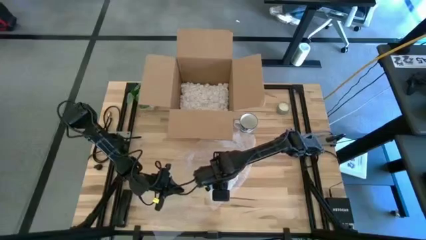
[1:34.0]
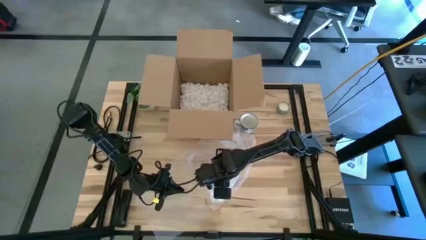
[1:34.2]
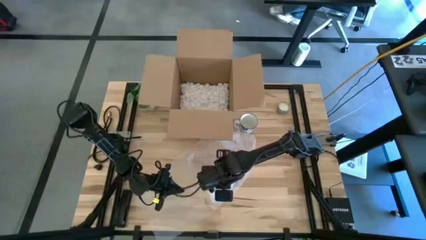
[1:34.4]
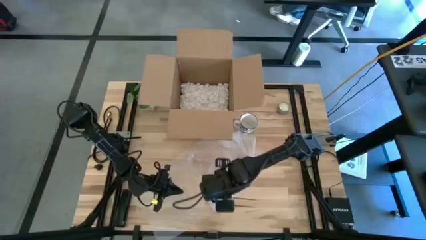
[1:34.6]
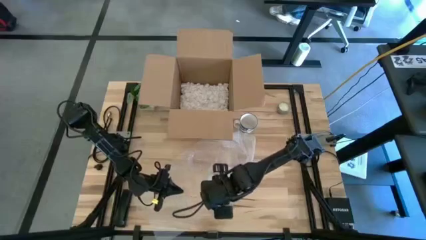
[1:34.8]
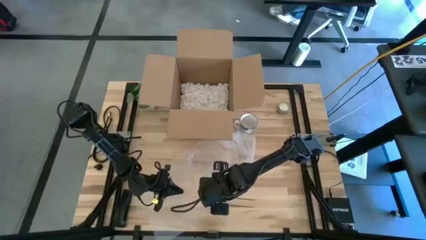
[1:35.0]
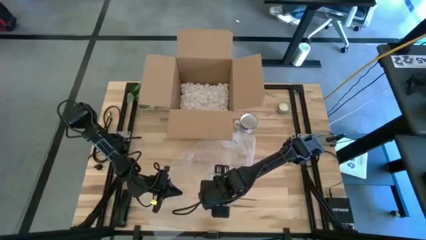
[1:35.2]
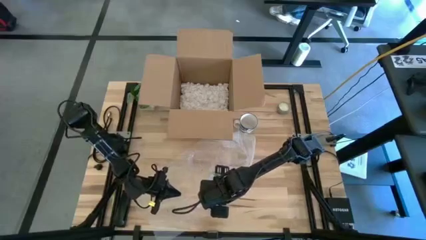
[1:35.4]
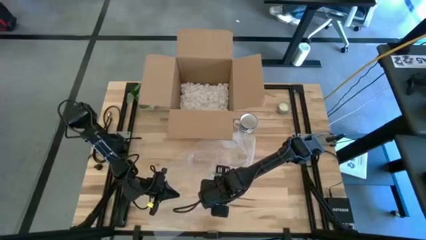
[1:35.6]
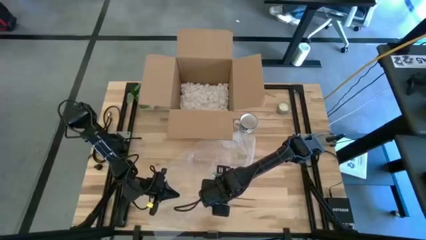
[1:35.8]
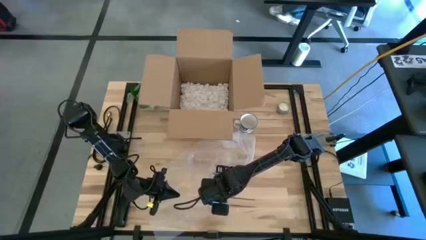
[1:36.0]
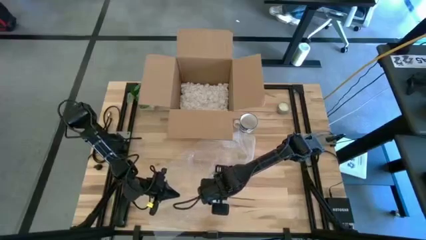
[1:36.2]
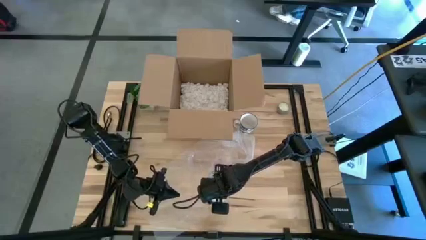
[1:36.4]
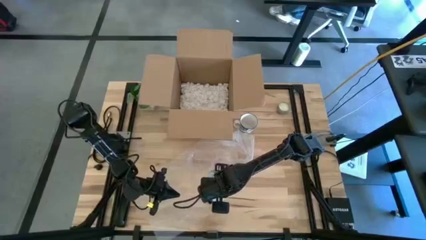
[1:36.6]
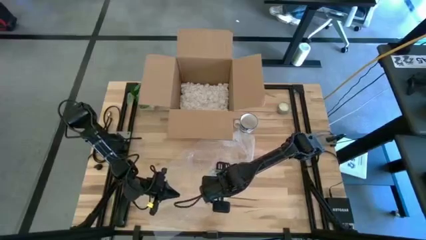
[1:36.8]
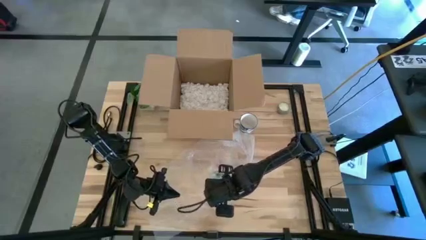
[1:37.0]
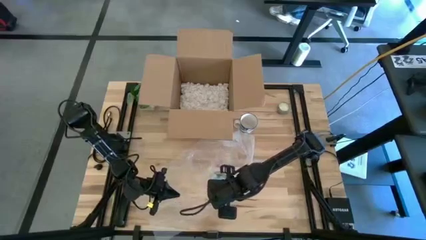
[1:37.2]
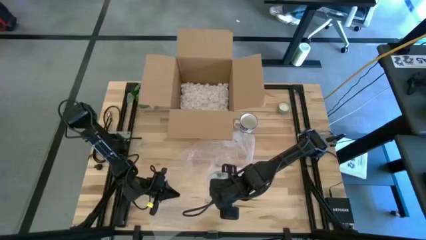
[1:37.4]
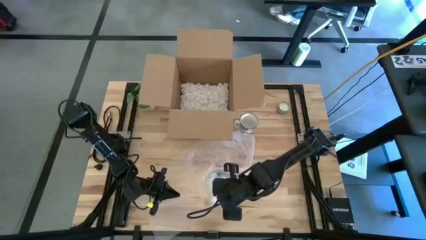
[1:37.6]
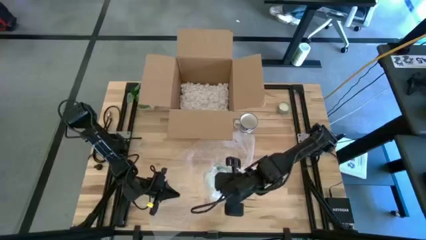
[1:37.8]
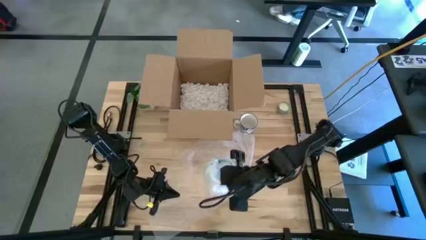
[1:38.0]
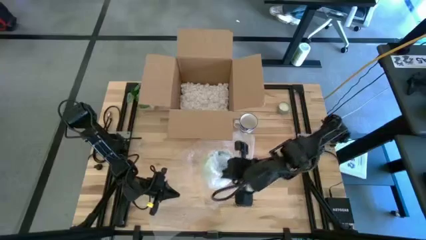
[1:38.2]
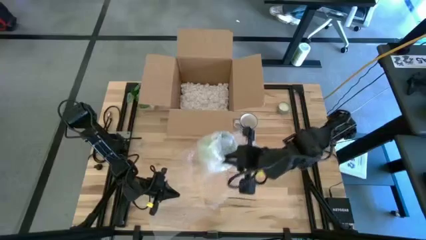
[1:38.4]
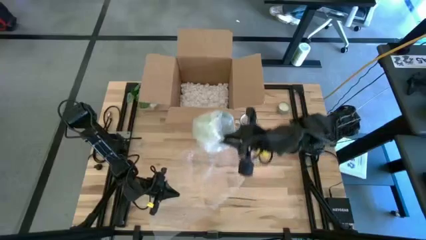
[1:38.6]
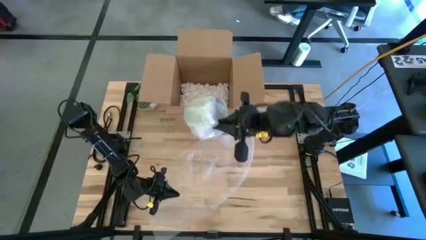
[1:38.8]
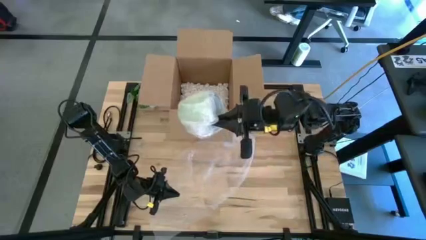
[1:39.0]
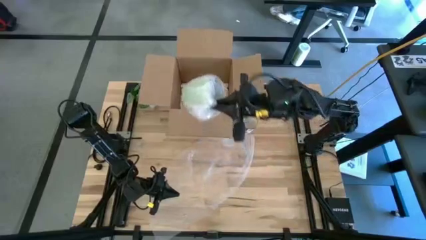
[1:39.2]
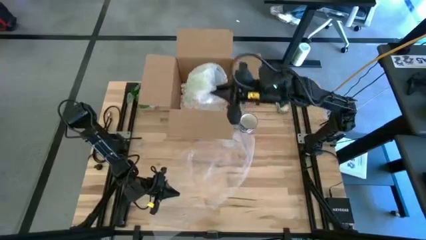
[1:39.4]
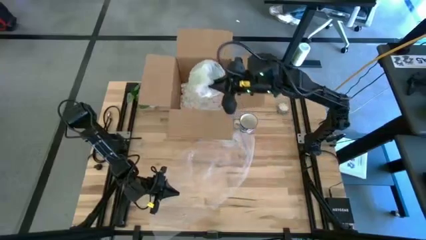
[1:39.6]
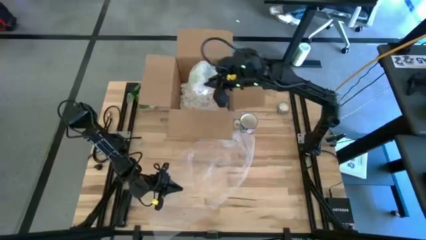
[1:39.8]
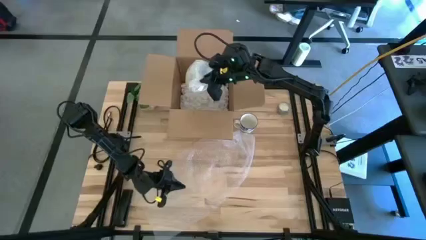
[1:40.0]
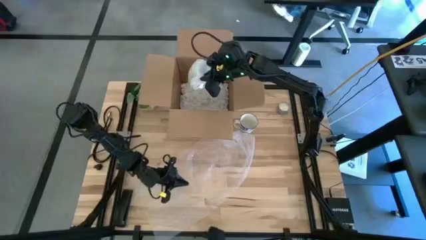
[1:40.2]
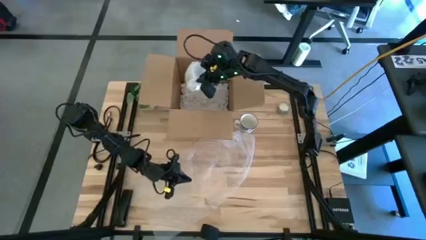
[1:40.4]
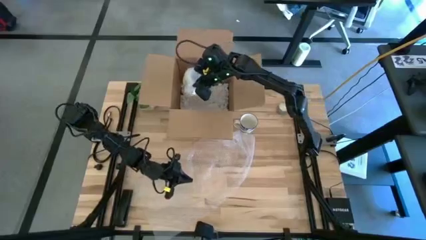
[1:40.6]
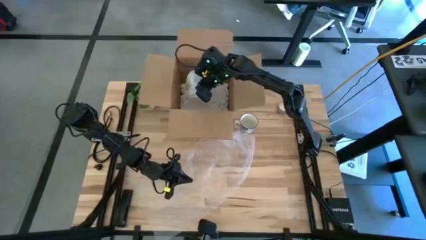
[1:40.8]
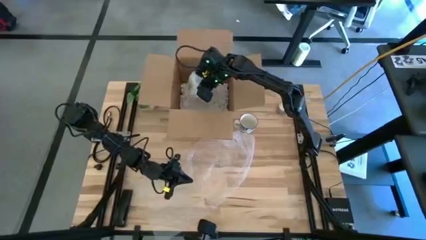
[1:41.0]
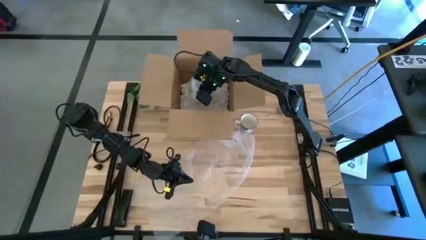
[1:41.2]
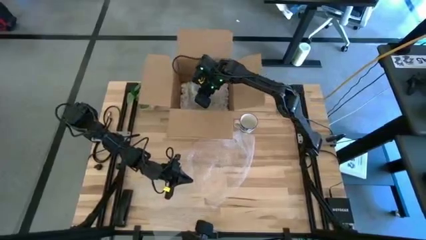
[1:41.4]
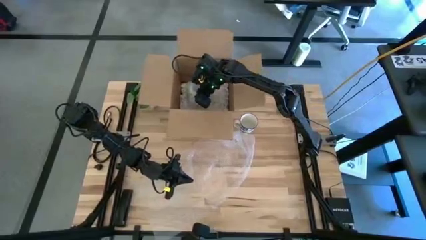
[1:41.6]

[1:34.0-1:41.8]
Task: wrap mug
Put the wrapped green mug into the cardboard box

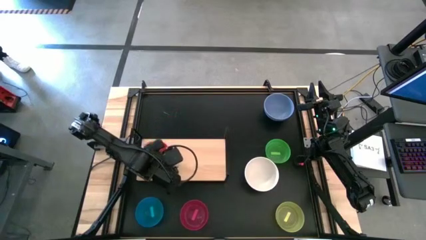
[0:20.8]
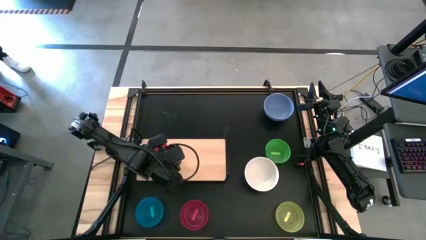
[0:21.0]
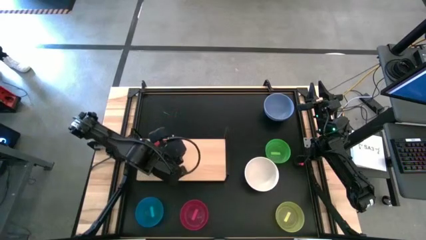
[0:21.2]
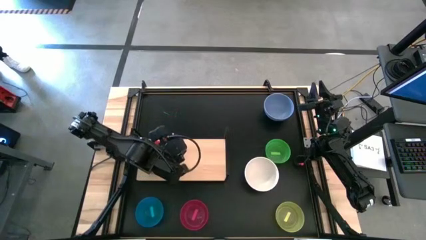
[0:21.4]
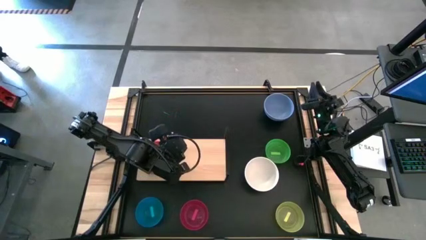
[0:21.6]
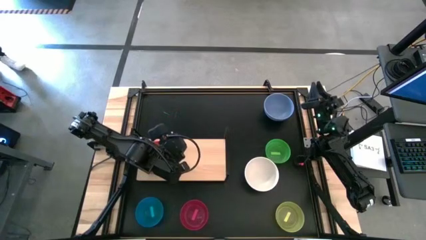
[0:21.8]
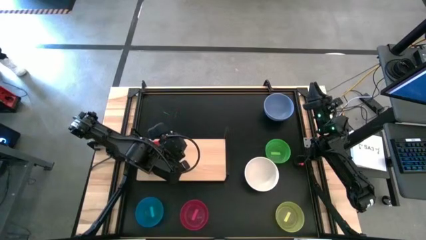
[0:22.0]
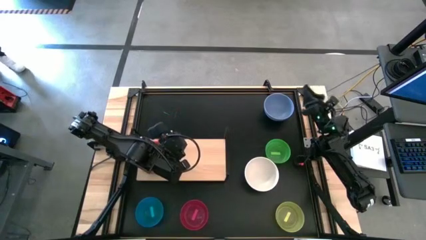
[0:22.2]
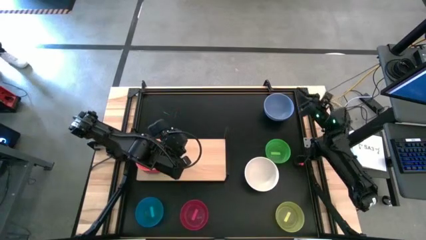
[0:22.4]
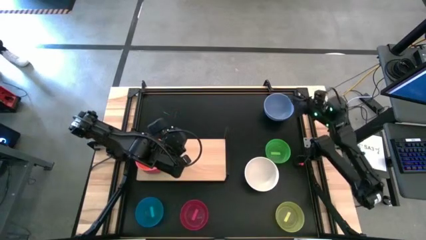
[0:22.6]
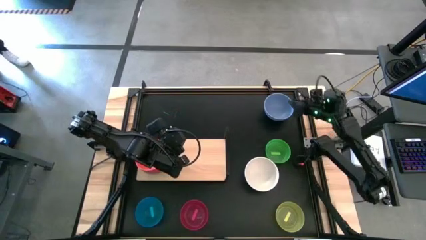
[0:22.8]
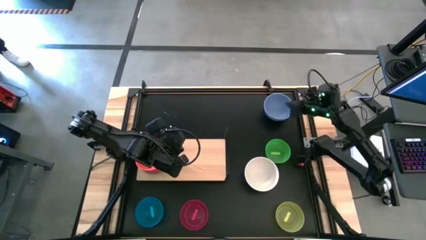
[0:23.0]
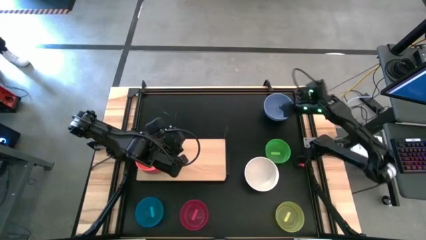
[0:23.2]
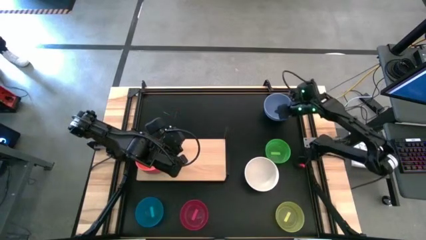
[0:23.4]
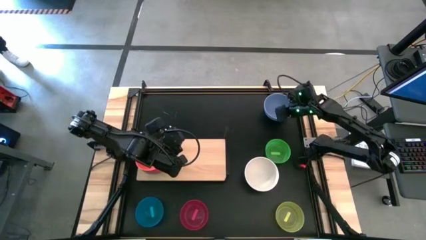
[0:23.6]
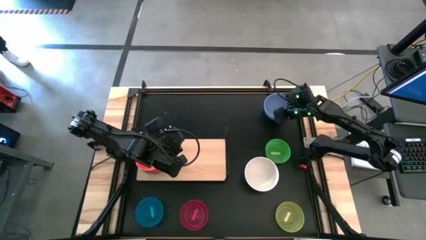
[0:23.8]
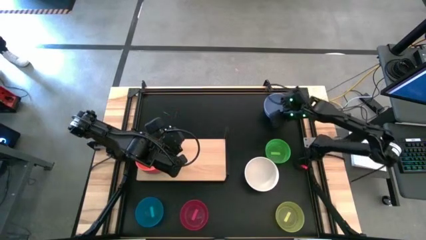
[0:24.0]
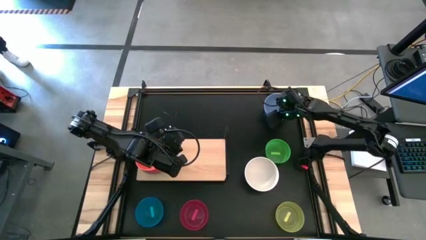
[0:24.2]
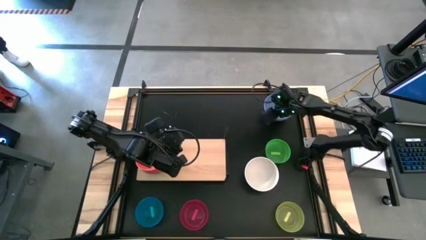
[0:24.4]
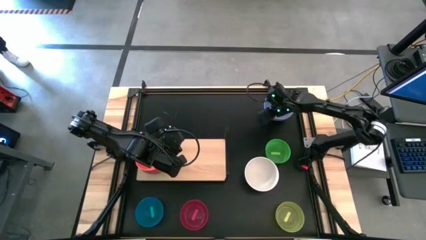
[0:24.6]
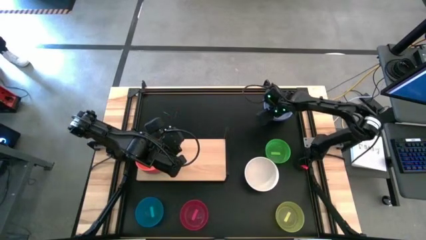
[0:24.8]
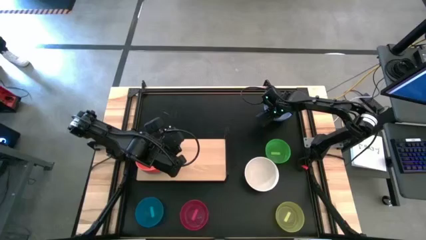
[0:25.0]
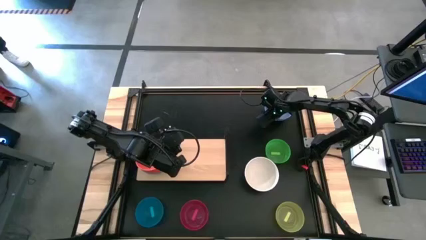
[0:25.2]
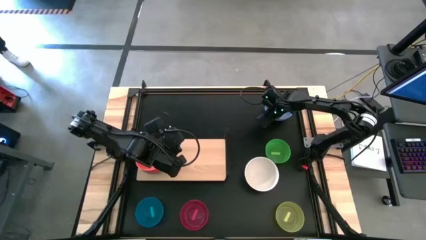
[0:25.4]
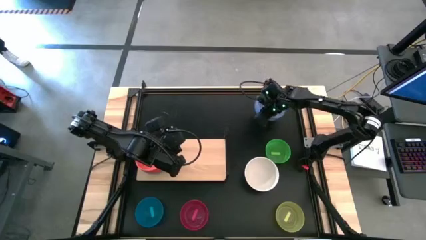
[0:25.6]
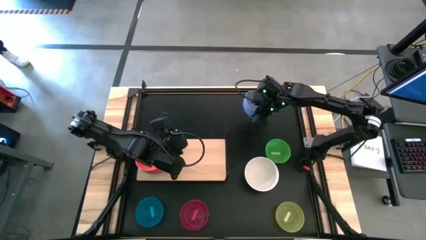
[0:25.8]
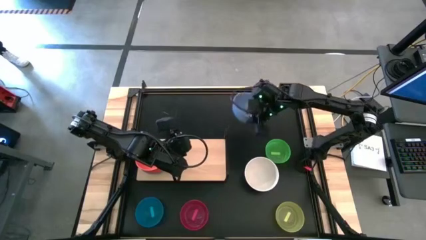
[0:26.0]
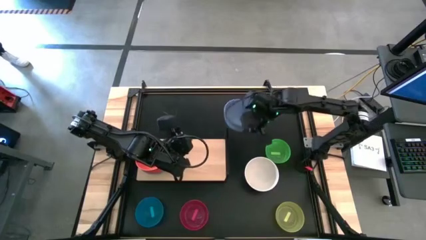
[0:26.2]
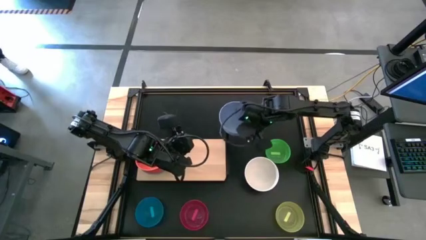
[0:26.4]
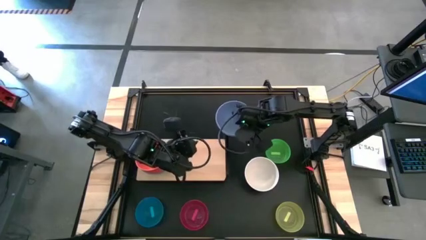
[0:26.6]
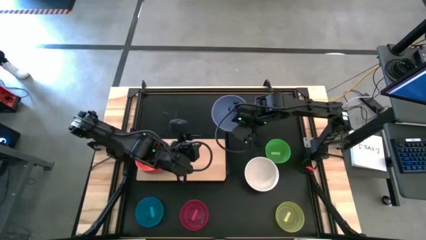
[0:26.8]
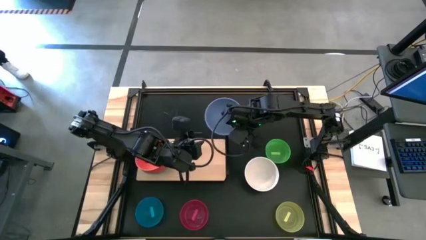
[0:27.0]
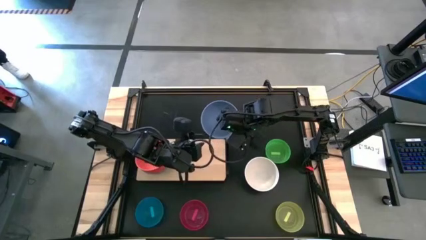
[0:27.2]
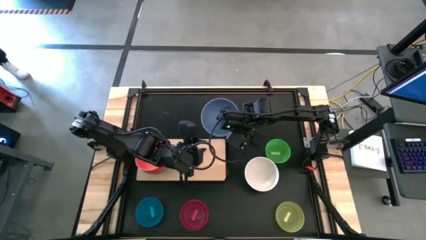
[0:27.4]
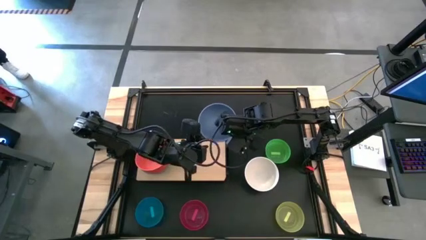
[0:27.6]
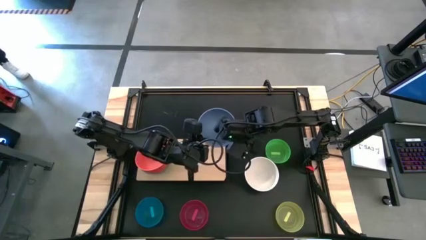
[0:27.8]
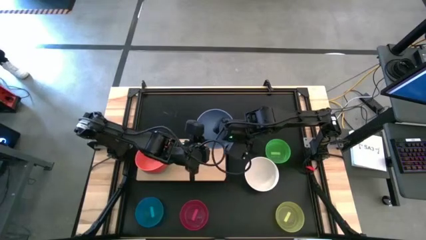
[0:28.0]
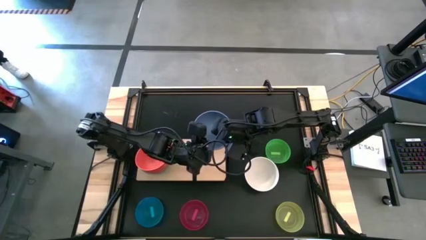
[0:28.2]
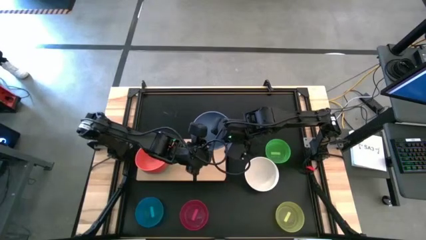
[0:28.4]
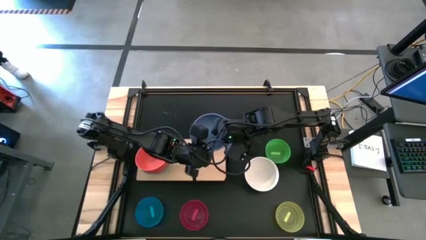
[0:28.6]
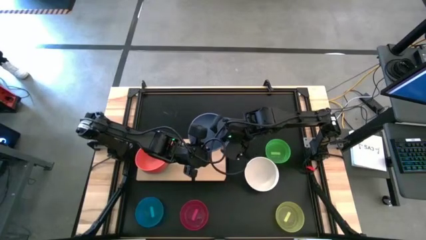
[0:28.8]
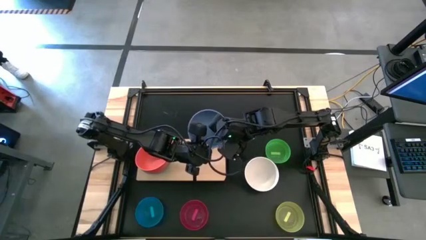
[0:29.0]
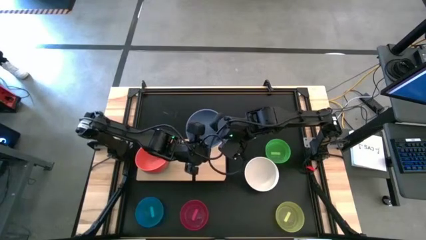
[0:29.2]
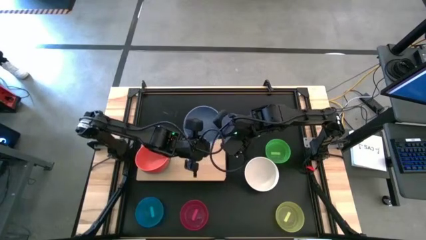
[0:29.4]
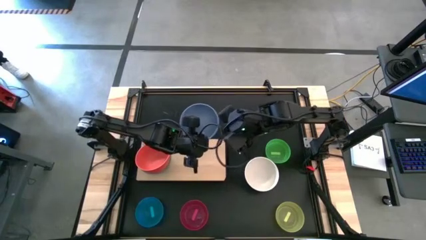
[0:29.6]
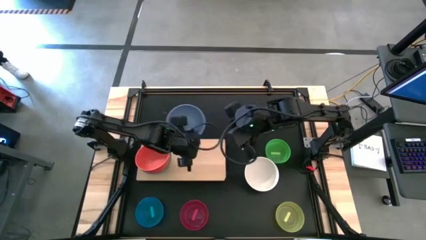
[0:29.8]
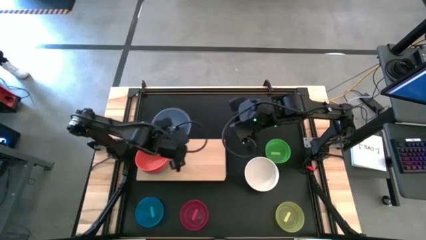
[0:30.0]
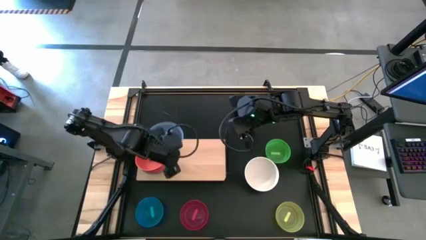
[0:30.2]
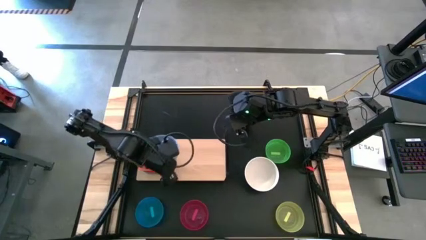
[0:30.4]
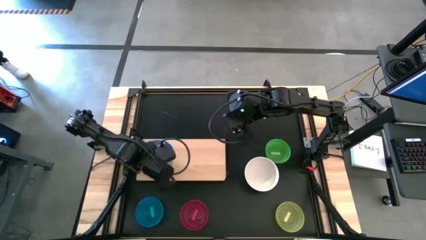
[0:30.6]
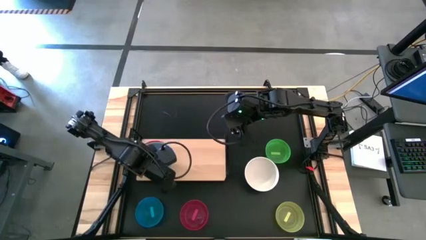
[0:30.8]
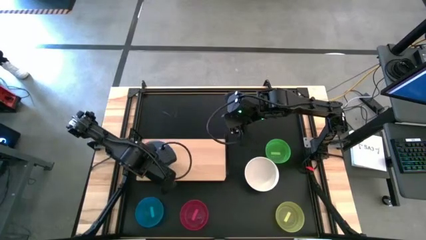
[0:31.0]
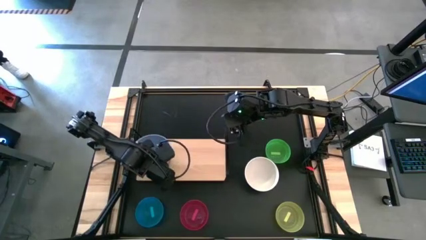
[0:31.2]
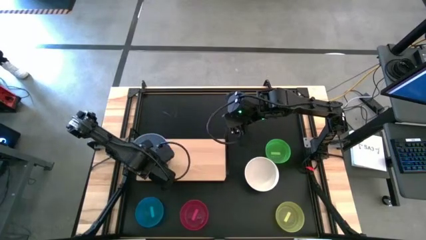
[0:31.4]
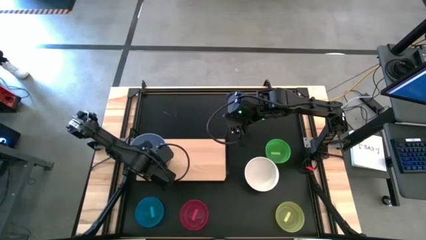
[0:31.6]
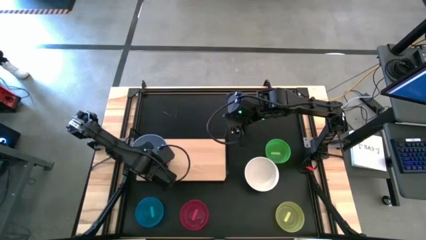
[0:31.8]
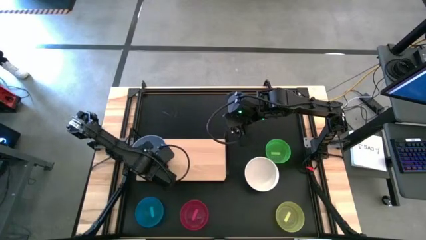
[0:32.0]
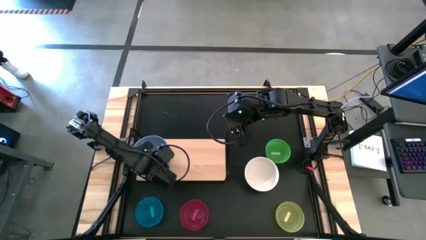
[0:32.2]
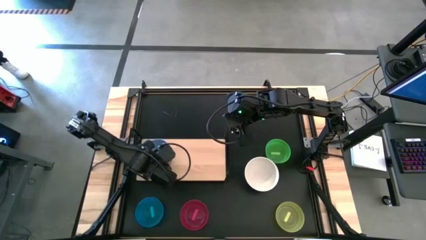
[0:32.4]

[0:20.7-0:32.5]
Task: Place and stack bowls onto a shelf
Stack the blue bowl on top of the orange bowl on the shelf
